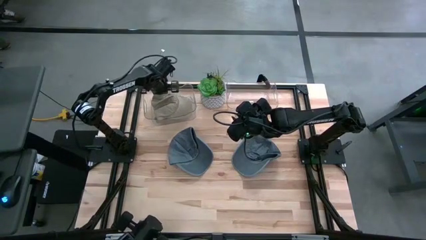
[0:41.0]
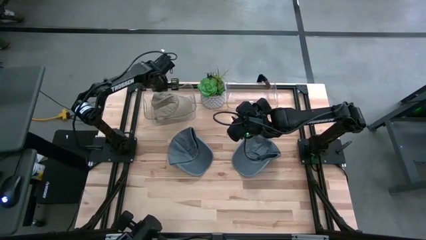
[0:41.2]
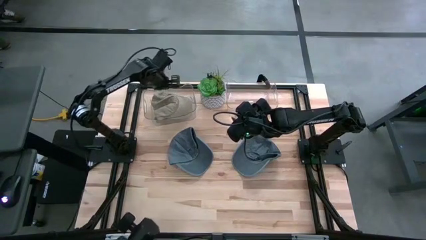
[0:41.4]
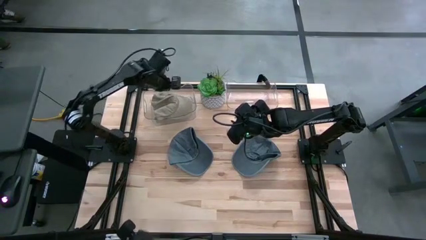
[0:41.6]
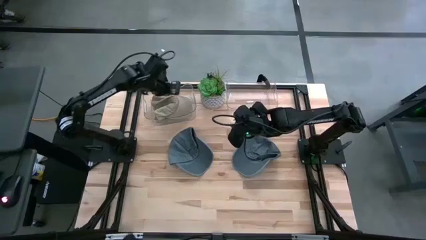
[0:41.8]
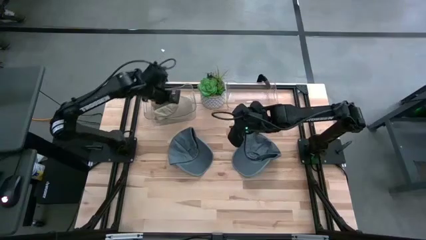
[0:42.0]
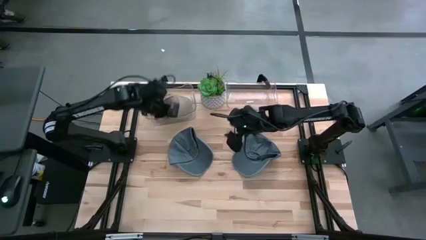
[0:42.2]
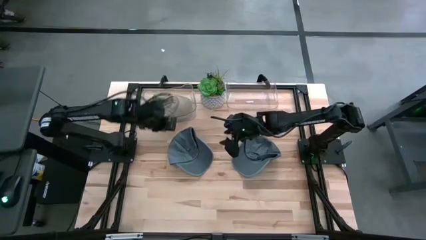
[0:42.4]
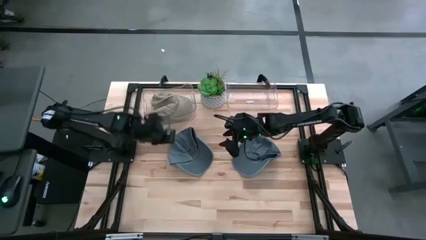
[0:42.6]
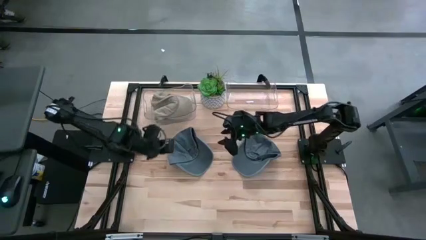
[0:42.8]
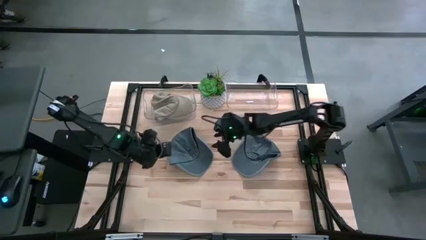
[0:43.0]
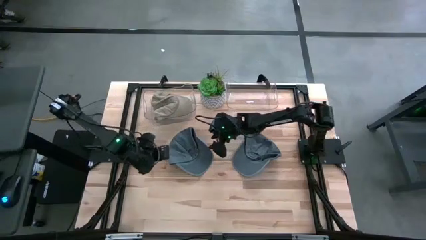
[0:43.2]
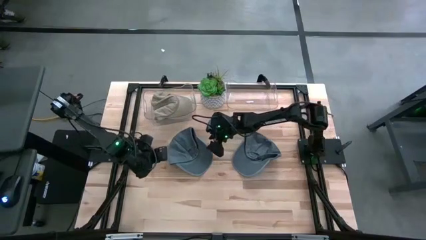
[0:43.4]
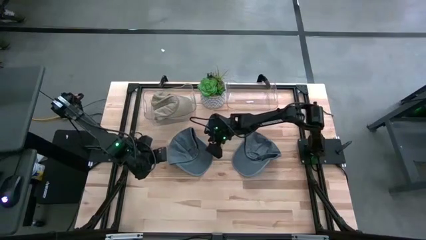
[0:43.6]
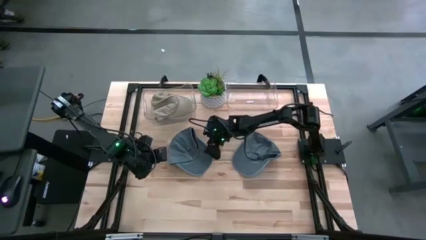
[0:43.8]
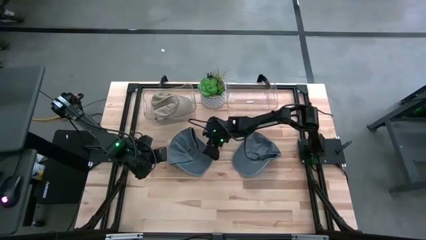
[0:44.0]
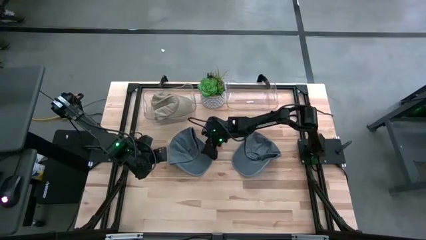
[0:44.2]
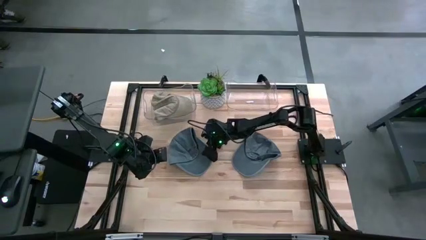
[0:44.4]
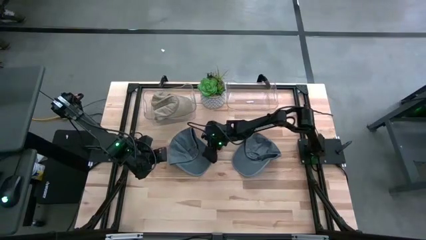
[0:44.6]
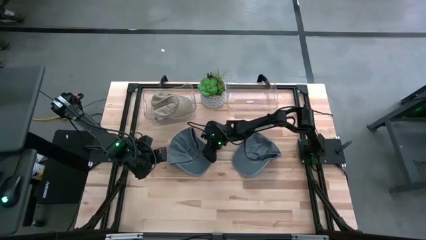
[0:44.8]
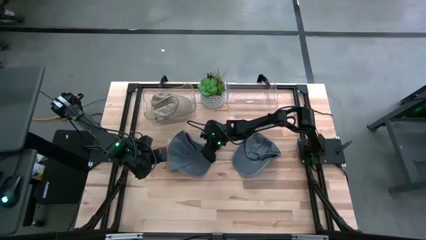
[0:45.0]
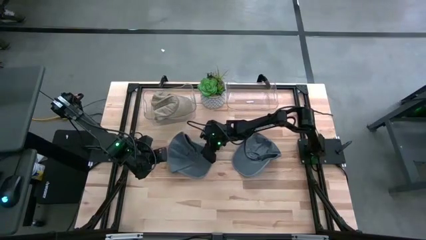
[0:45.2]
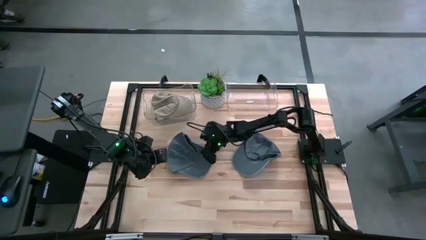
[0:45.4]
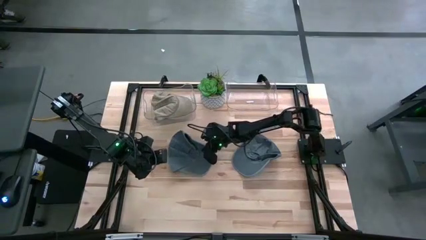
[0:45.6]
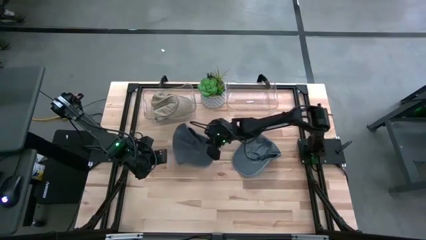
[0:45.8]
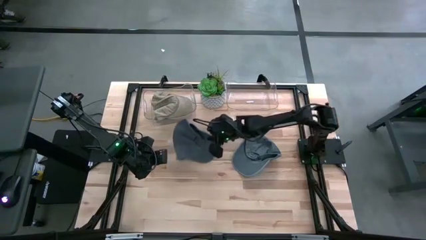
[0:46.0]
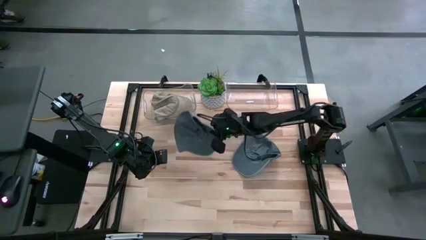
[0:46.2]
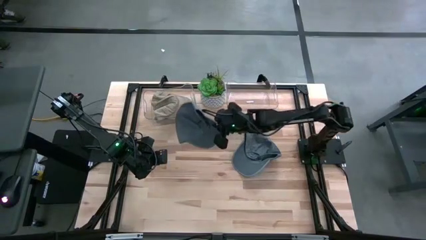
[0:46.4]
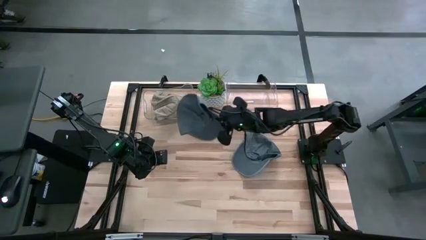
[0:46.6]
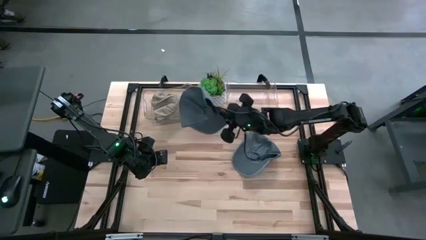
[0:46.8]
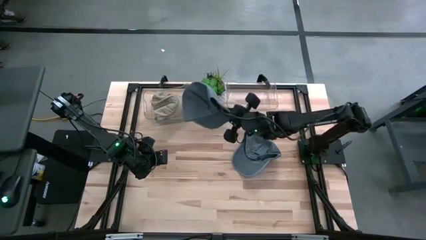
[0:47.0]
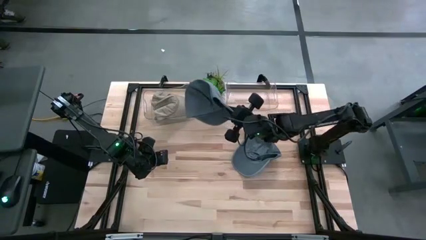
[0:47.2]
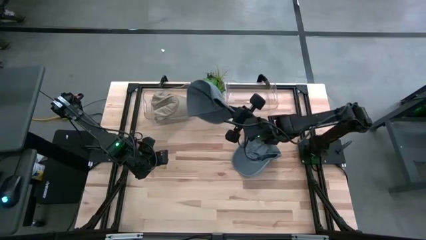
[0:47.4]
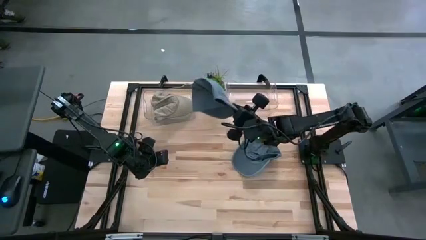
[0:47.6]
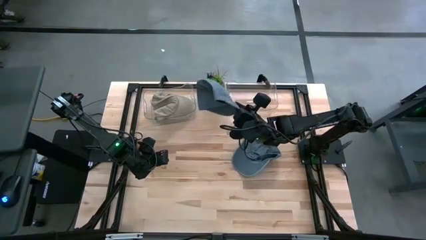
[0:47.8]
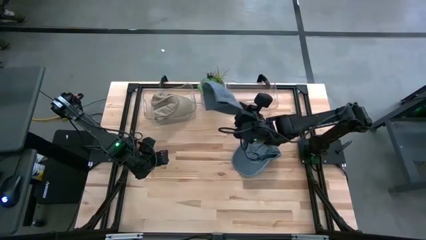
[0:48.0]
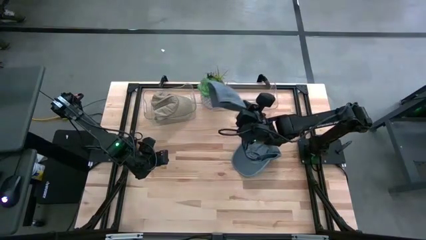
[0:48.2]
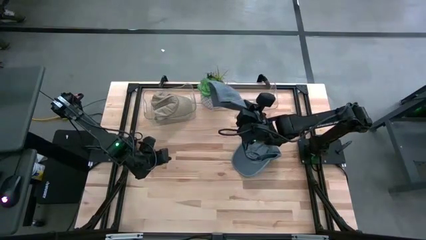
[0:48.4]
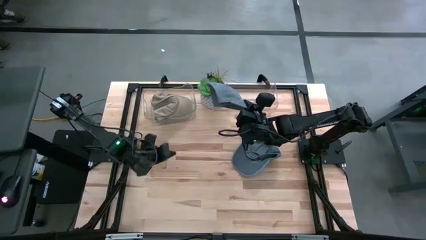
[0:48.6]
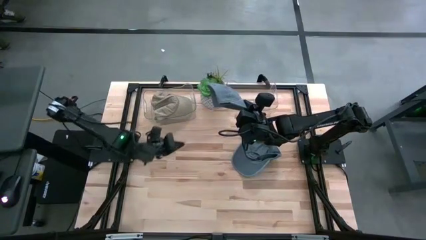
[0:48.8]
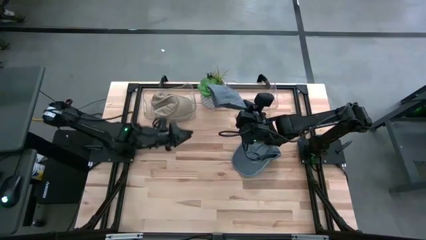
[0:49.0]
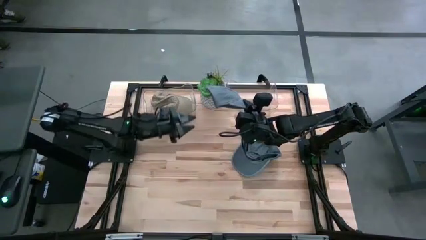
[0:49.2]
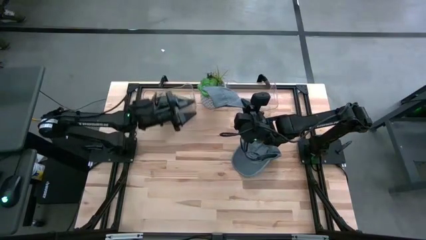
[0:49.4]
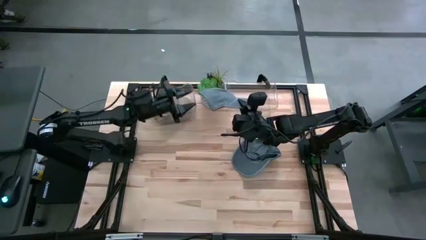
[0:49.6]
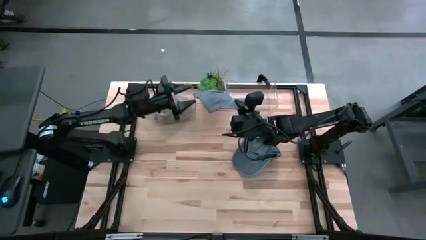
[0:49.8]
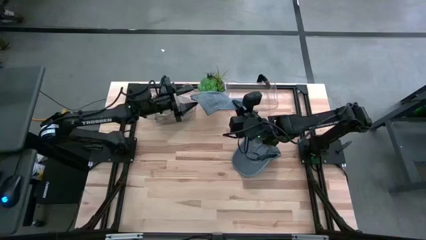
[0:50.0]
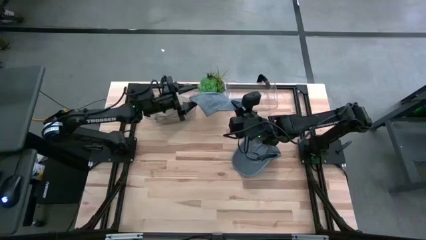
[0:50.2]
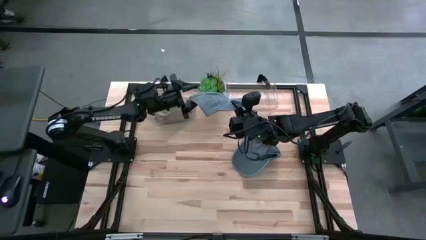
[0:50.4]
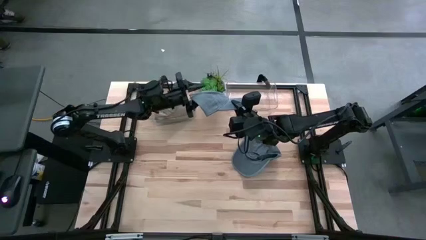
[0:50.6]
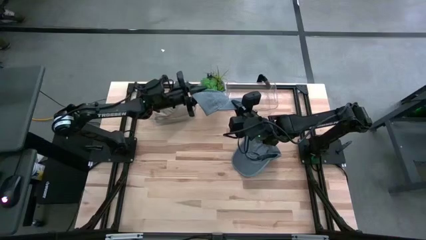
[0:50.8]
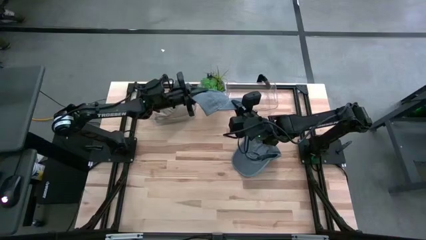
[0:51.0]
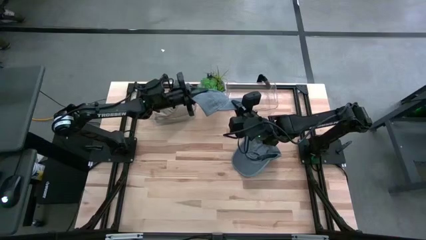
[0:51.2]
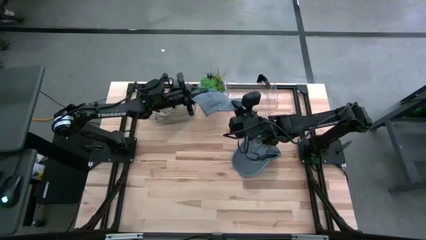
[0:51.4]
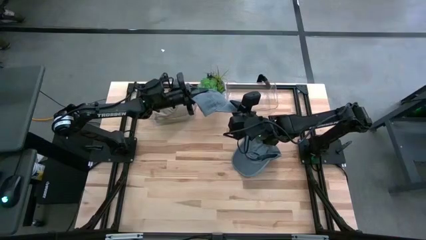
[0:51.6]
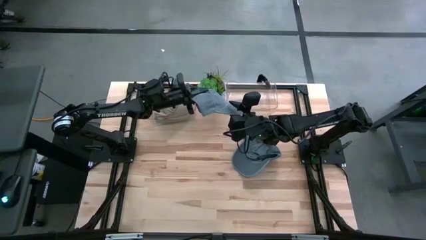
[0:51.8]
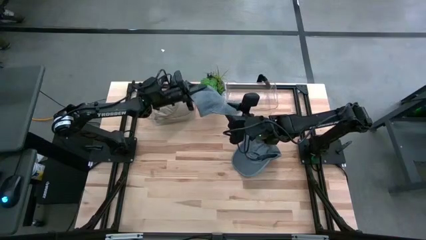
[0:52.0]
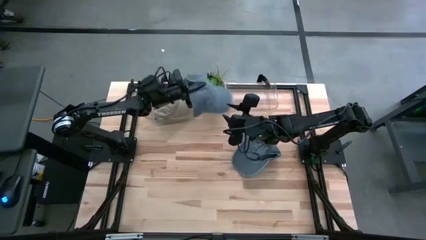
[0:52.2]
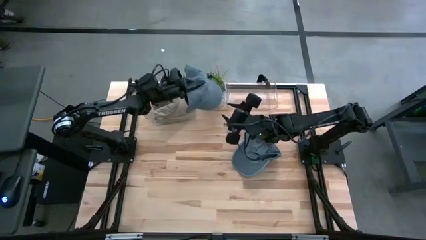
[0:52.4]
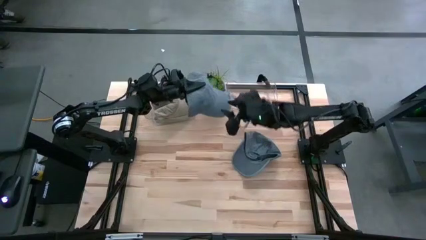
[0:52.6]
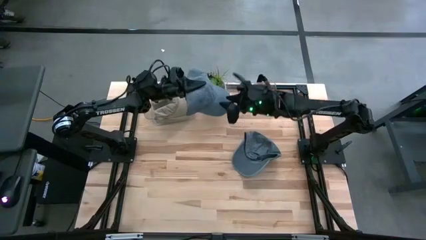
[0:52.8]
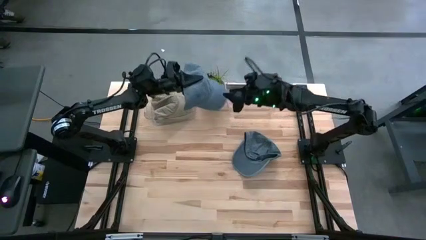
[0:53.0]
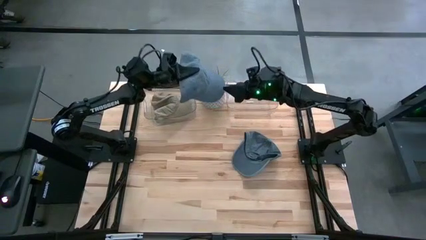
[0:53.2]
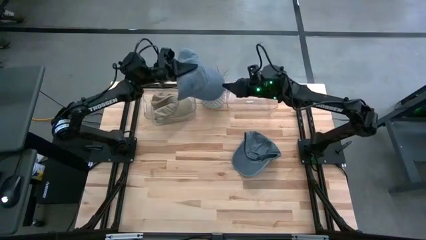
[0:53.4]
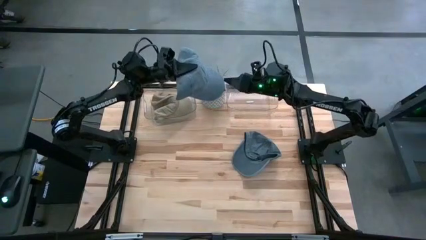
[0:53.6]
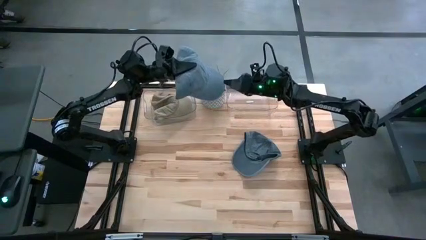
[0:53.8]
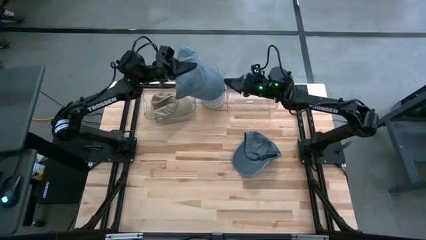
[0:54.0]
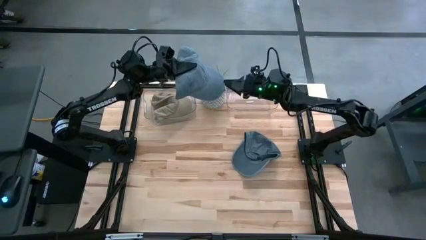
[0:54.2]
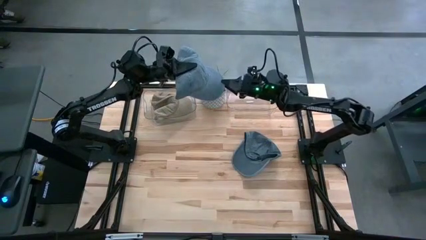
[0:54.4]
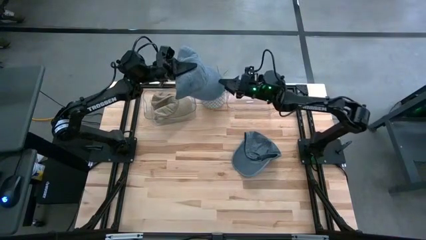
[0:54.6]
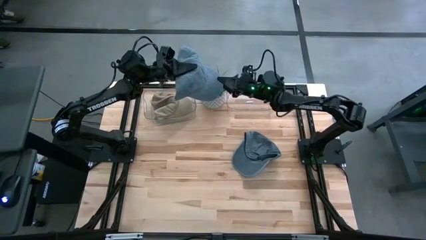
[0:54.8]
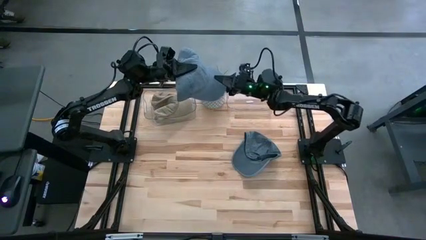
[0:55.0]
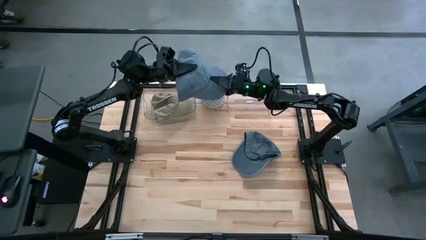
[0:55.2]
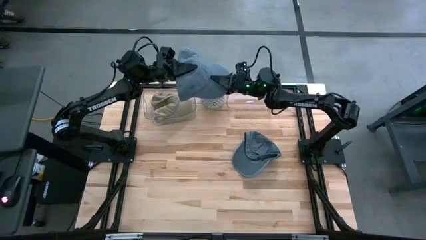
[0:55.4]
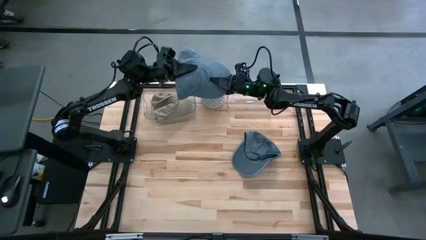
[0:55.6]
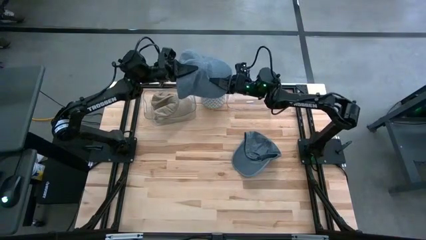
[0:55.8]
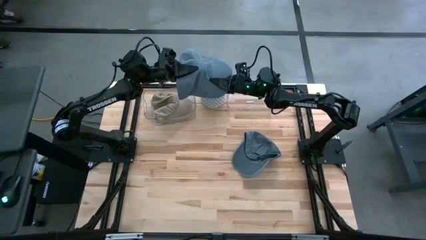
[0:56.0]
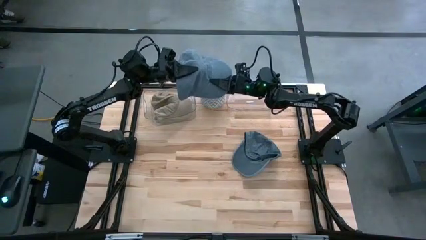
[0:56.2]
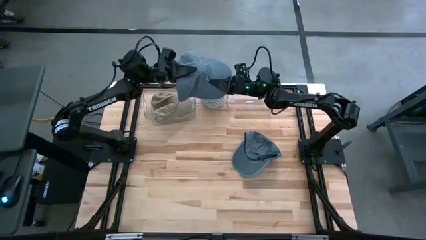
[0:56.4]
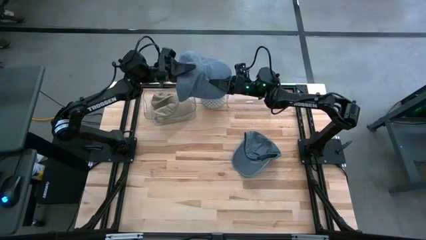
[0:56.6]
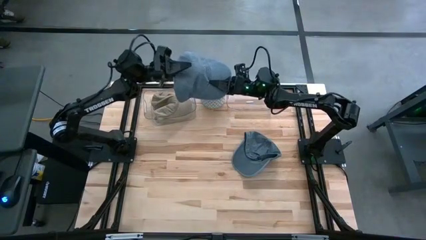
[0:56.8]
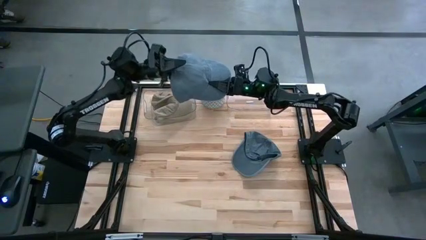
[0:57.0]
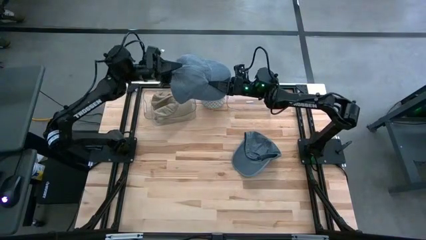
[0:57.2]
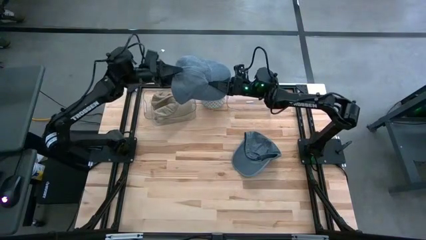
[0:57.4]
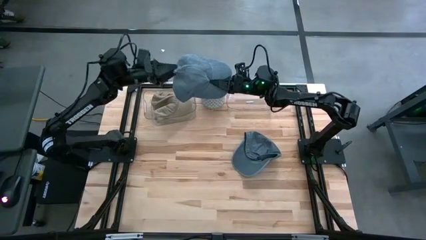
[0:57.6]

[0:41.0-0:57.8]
Task: Pick & Place hat
Put the left blue cap into the right transparent bin
